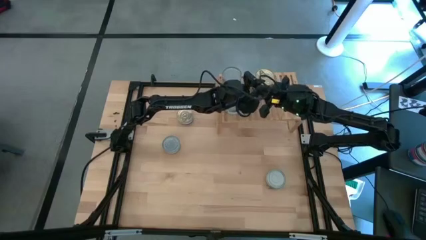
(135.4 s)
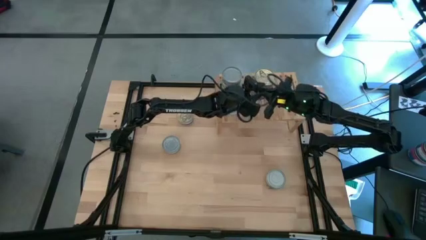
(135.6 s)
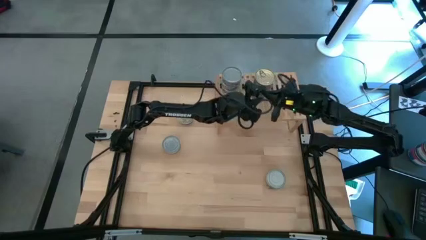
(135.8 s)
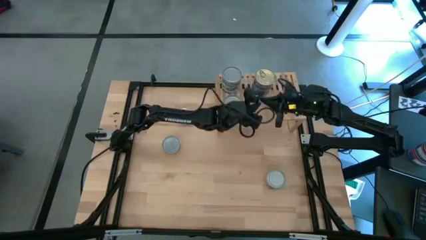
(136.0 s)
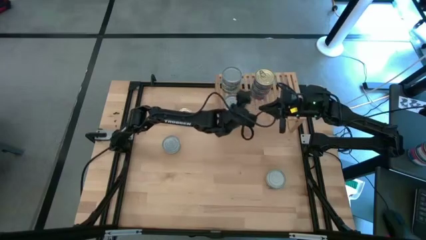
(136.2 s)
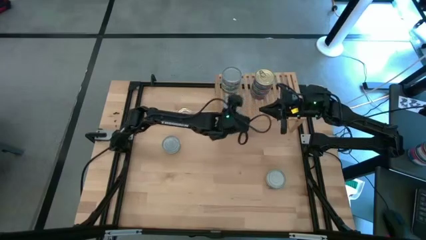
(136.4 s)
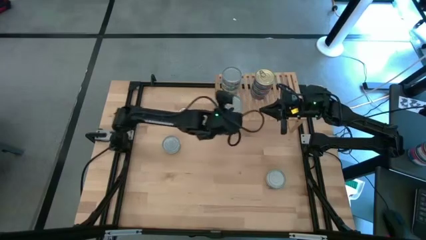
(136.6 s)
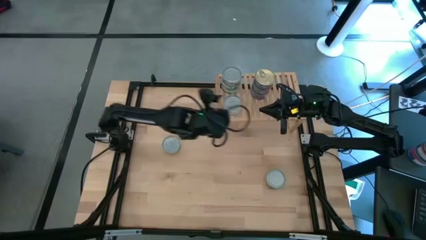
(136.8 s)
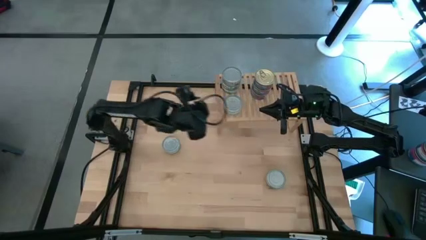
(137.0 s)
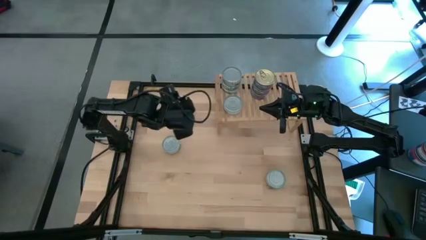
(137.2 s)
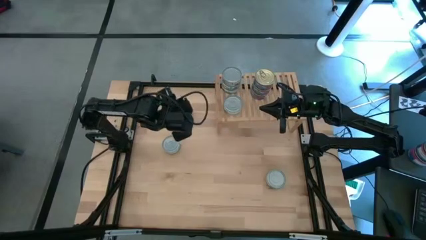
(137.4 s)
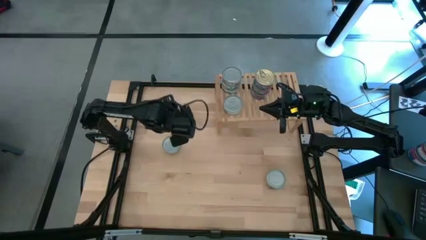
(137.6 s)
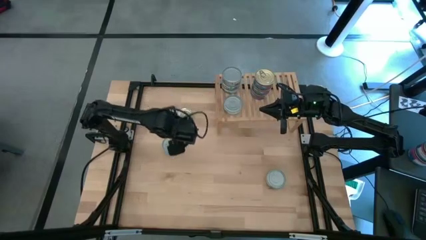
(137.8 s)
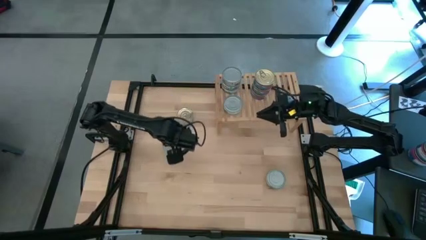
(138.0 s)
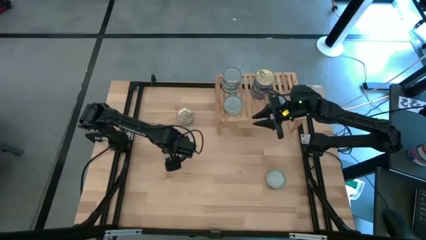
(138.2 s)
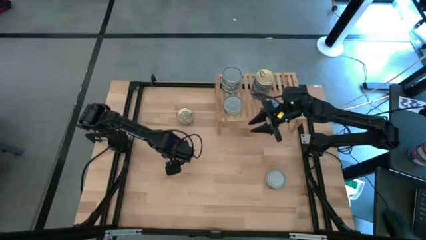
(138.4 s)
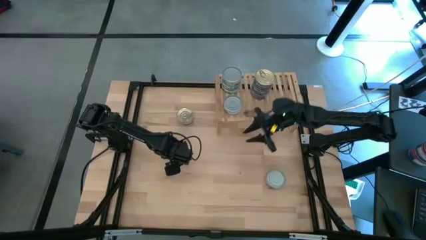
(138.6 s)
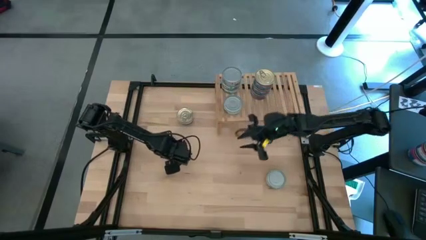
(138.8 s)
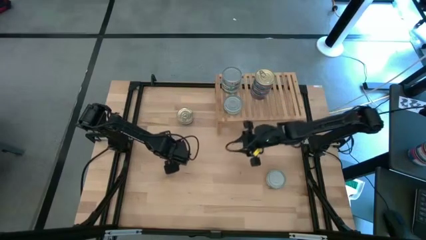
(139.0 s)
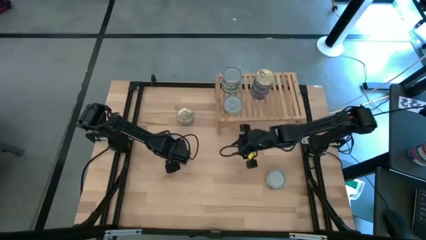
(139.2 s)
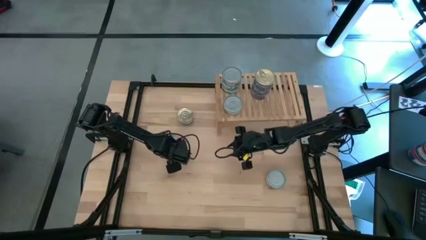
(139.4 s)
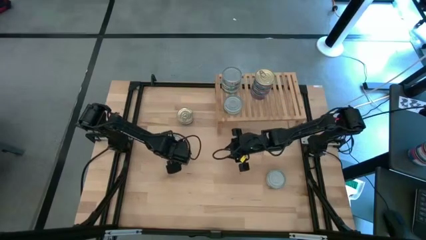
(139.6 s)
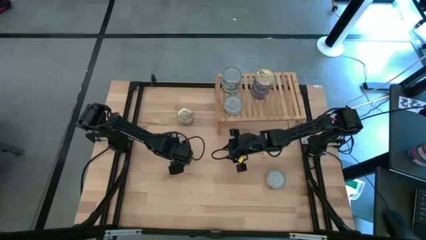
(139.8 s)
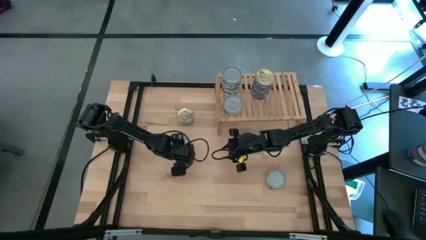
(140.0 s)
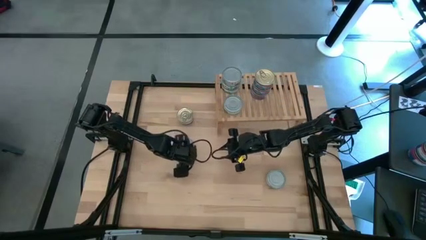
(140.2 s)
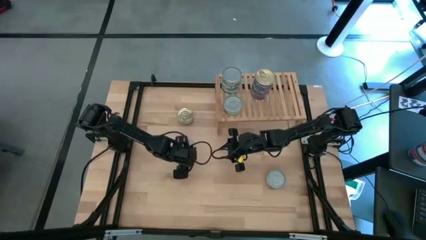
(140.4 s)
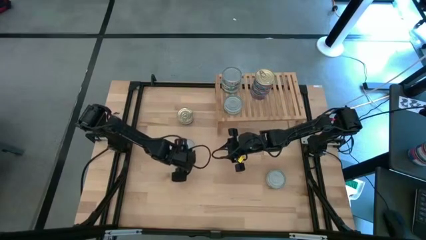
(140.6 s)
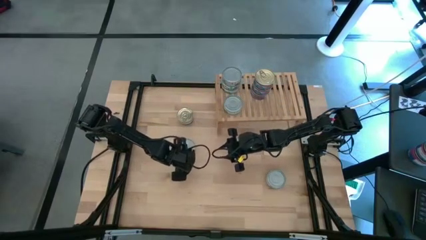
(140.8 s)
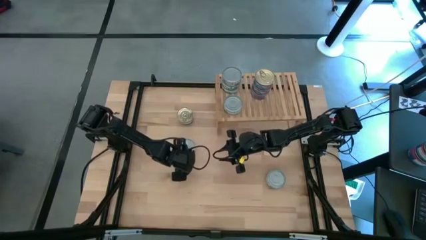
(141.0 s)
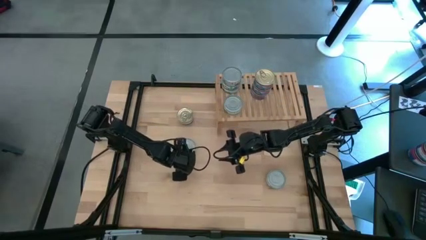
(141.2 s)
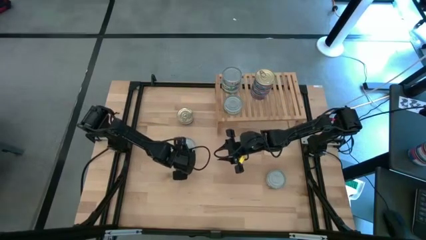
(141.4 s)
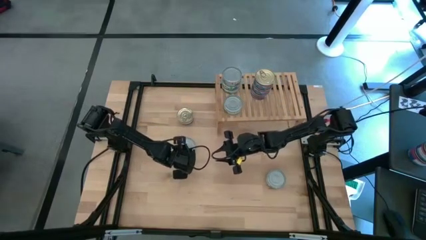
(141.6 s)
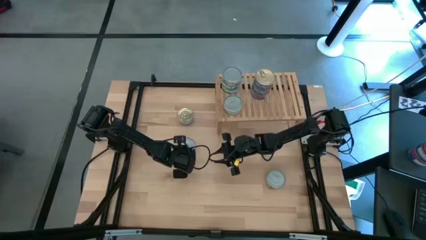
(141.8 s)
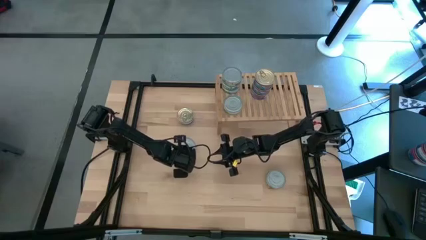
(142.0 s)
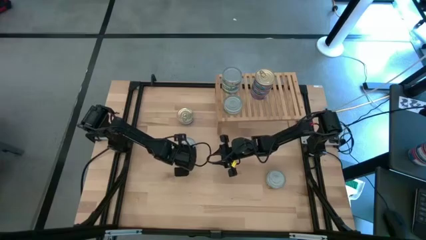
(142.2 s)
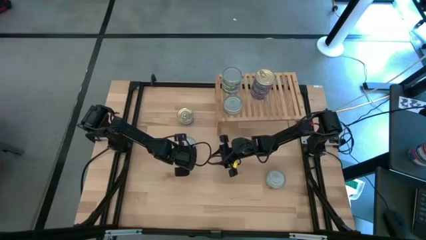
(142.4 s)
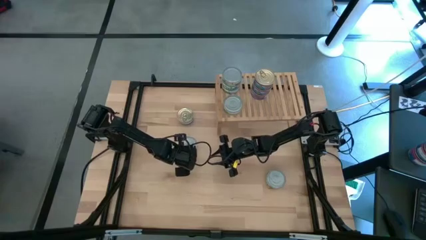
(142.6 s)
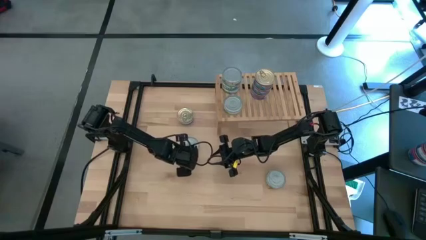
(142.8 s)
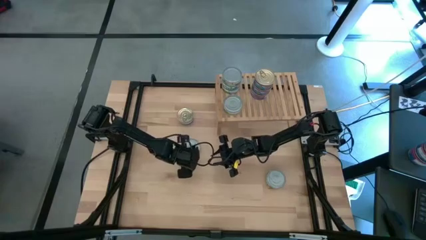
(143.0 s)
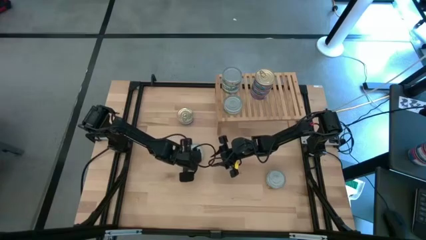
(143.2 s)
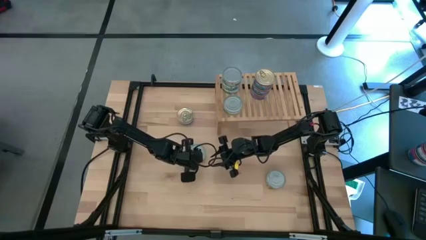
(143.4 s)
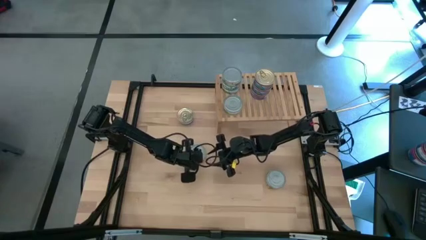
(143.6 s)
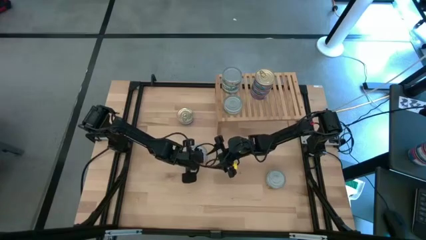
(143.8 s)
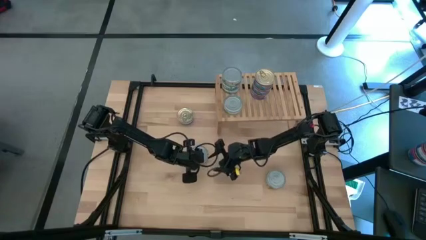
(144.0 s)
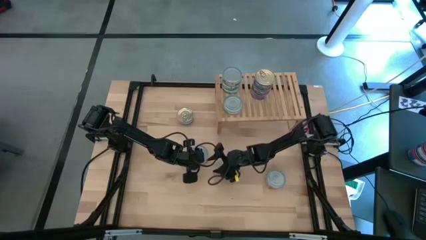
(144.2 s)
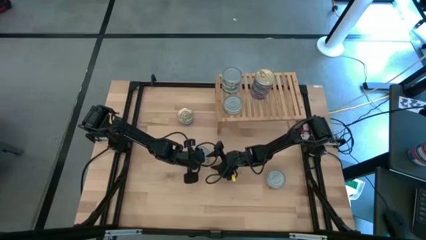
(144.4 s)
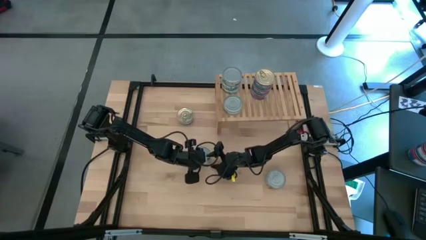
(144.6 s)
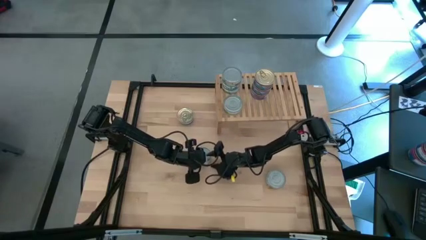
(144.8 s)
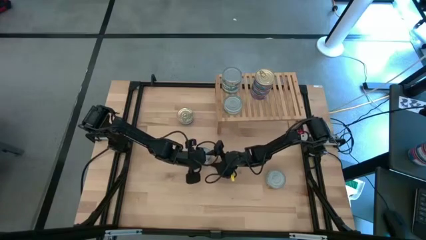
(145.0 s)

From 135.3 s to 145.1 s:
Task: Stack canned seafood by type on shelf
Stack the green tuna can on top of the green tuna can on the shelf

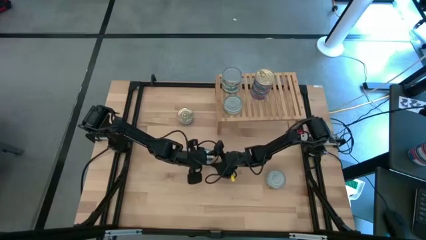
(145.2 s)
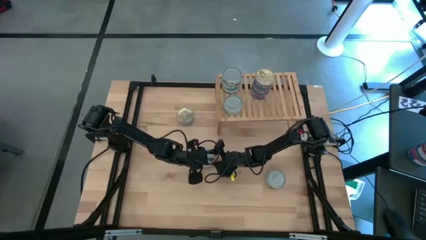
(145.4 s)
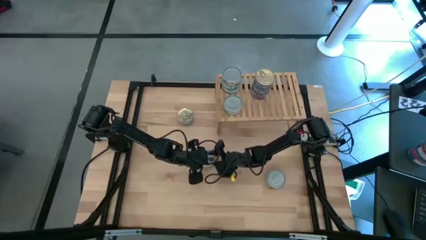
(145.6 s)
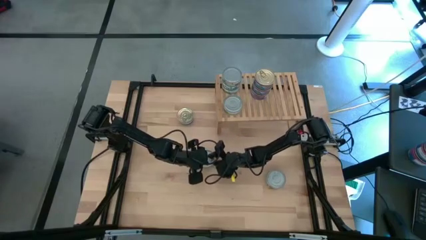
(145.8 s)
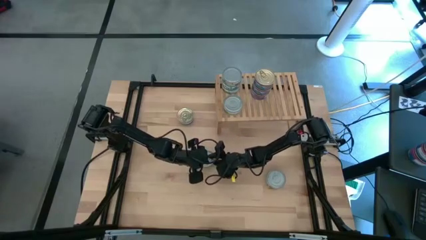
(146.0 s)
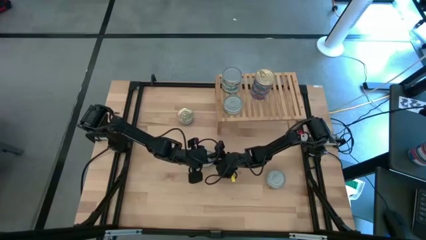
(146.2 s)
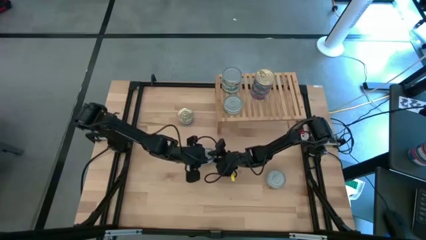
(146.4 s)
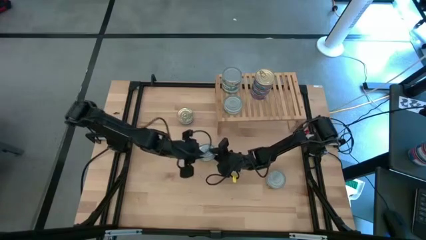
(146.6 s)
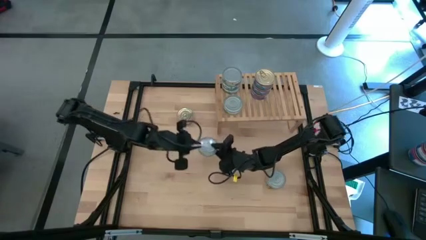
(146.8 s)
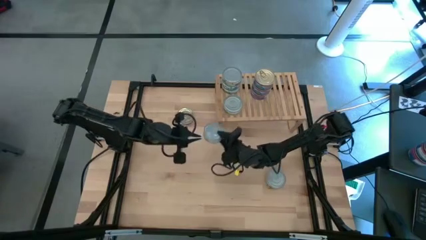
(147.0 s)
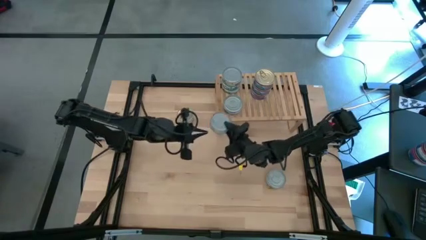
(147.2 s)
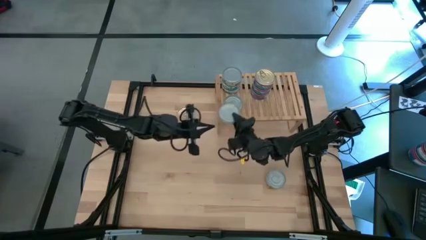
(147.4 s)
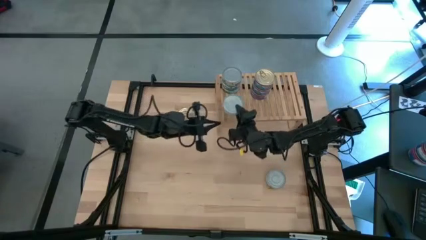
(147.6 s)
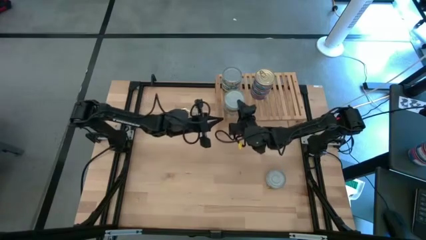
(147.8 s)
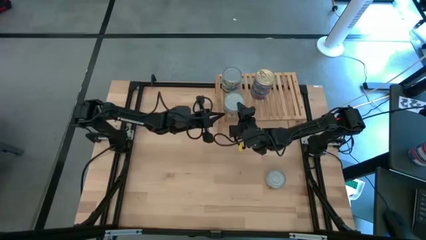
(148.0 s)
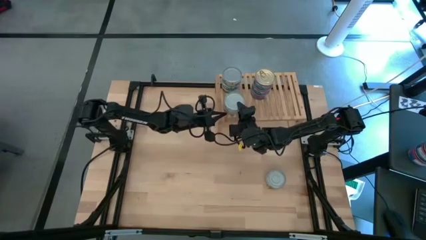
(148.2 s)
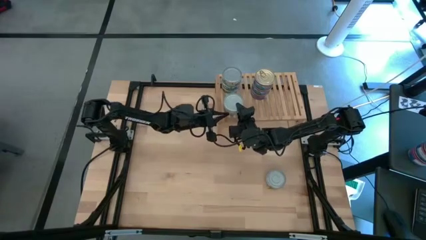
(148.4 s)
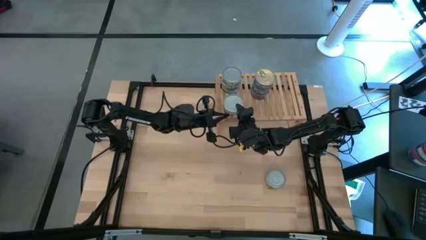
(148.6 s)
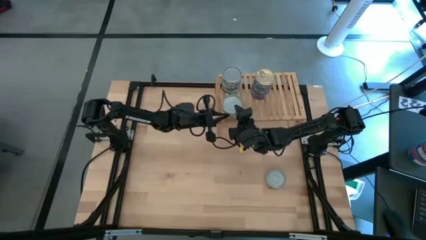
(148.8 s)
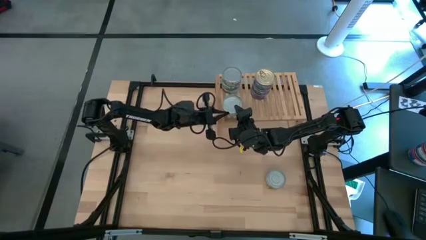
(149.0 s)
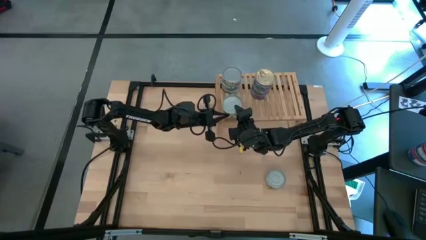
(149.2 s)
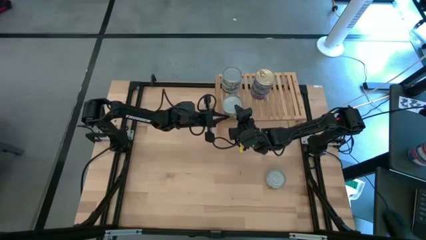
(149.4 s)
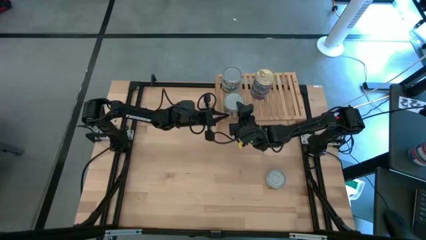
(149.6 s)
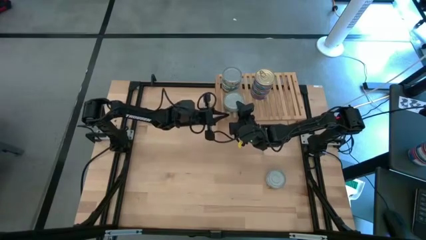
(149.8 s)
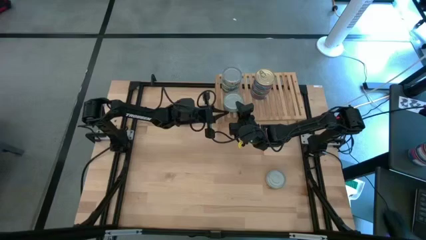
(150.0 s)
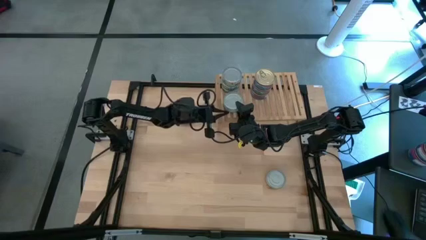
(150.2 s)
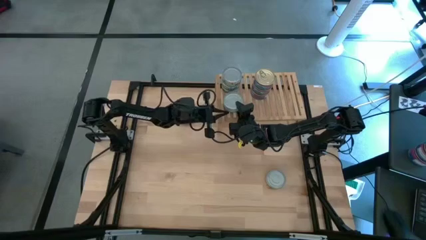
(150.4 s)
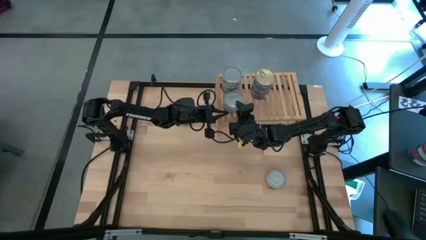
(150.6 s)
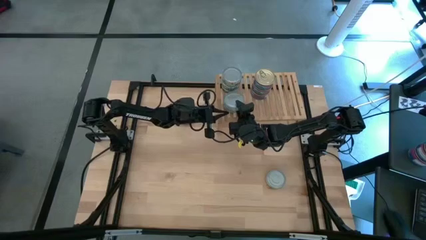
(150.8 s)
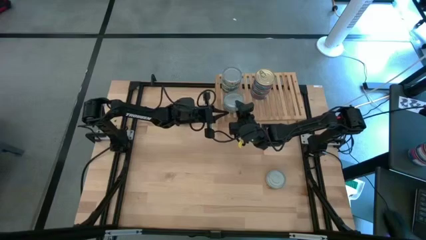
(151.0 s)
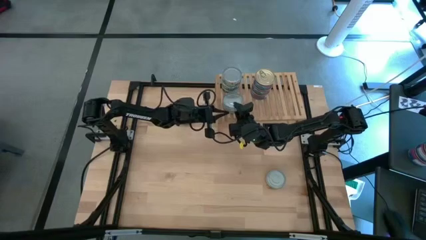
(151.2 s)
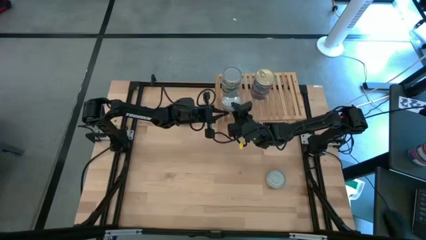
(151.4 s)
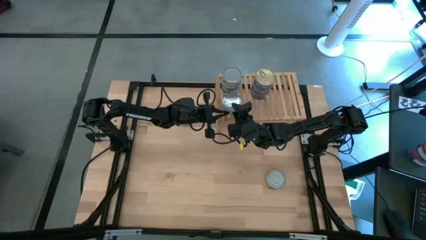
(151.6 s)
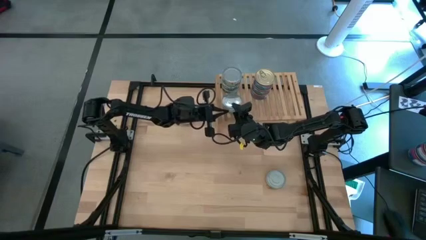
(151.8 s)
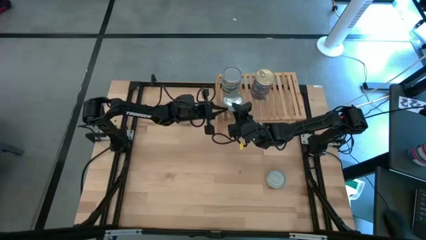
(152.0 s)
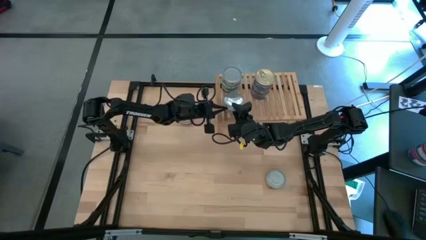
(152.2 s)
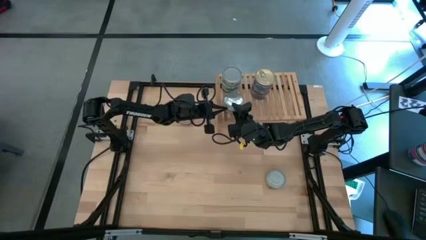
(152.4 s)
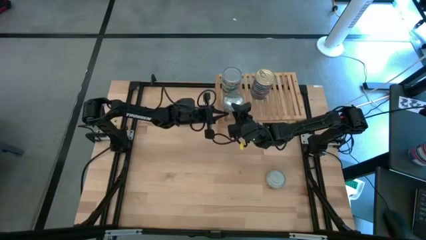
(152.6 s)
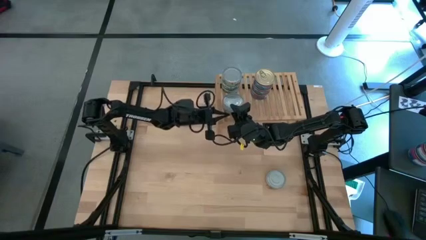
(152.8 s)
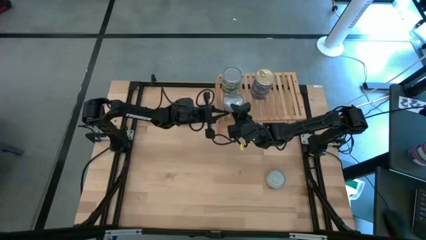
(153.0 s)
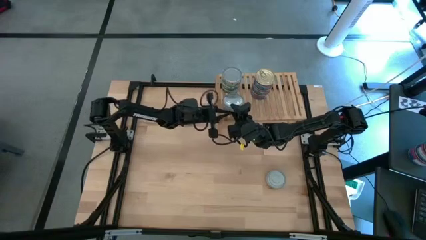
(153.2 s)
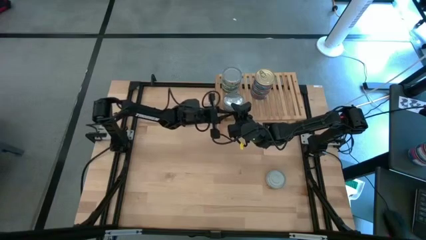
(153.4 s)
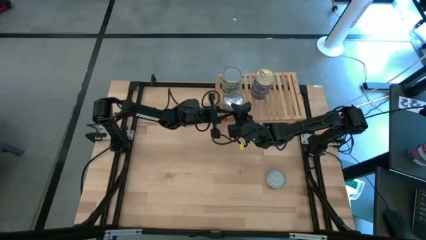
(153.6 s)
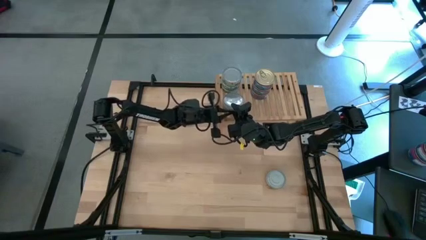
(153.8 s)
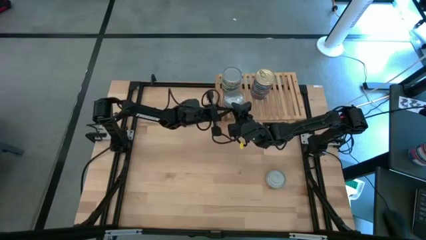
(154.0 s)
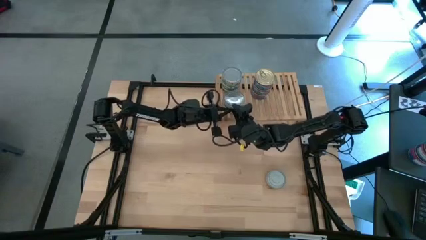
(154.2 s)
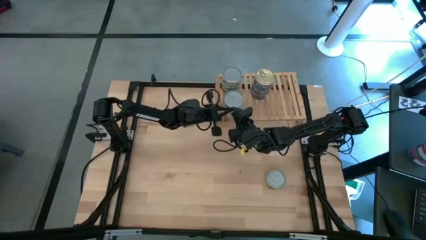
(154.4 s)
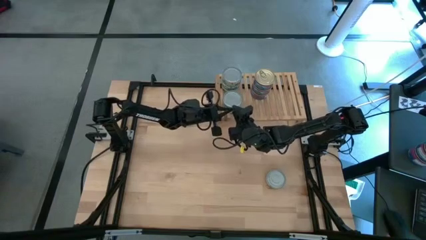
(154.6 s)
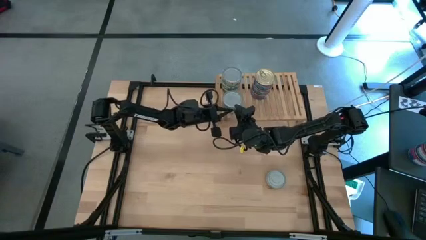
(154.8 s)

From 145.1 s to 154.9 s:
Stack the green tuna can on top of the green tuna can on the shelf
